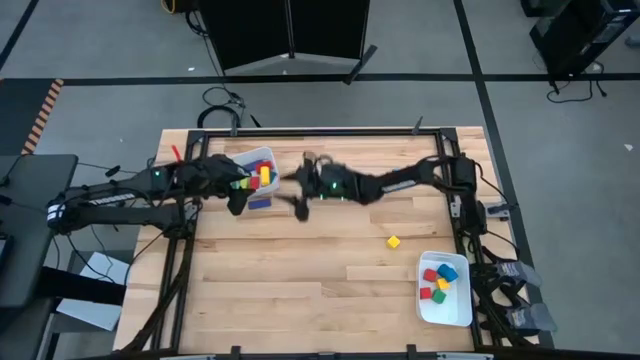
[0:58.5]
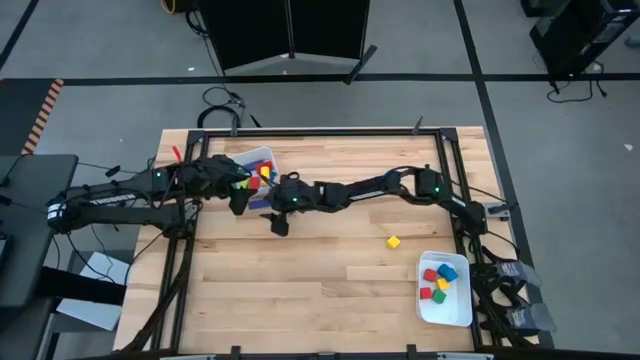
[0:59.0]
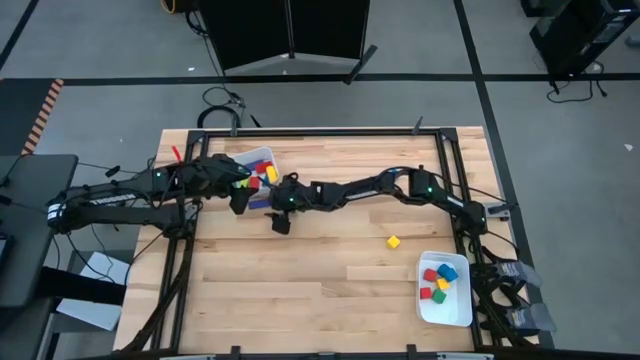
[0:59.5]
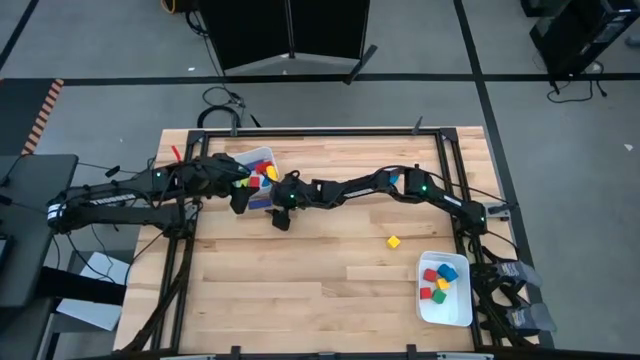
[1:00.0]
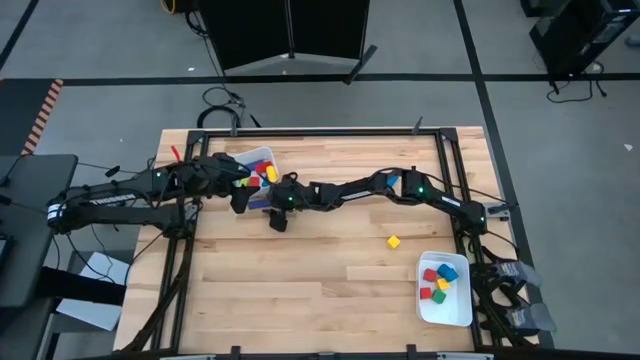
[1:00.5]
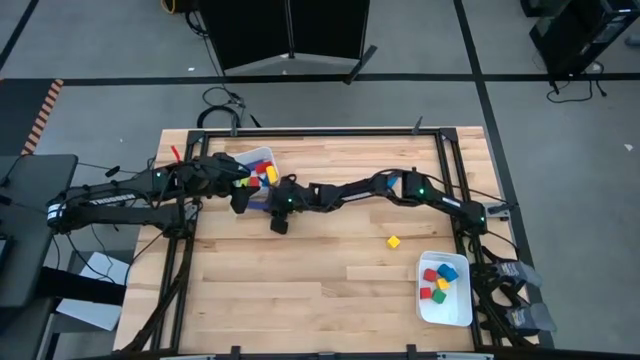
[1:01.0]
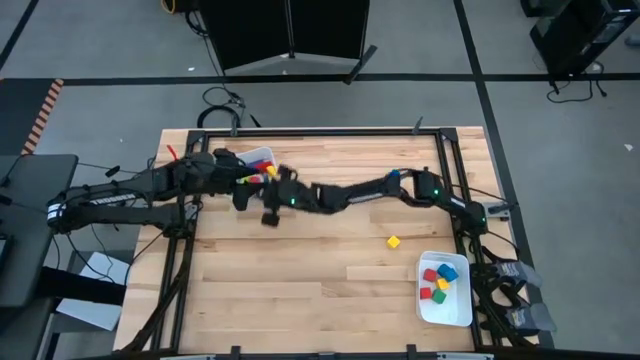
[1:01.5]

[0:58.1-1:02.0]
Task: Sort blocks by size
Put the large blue block into the top white bin

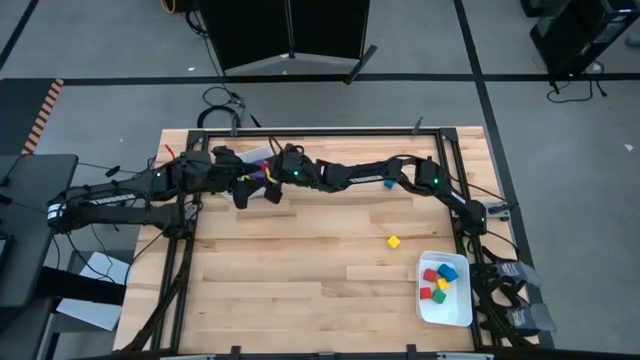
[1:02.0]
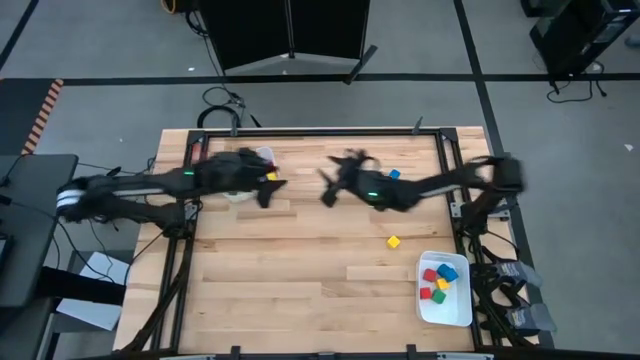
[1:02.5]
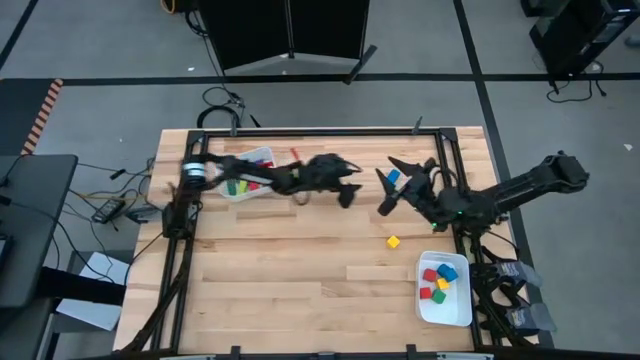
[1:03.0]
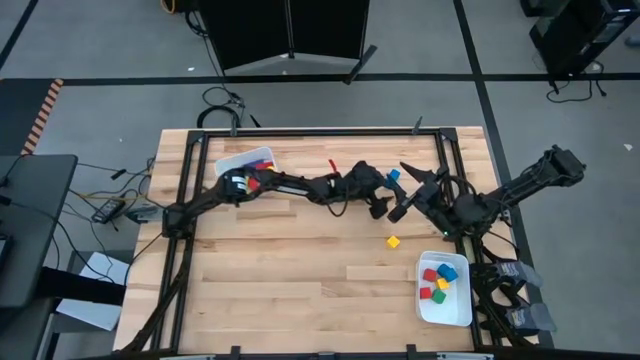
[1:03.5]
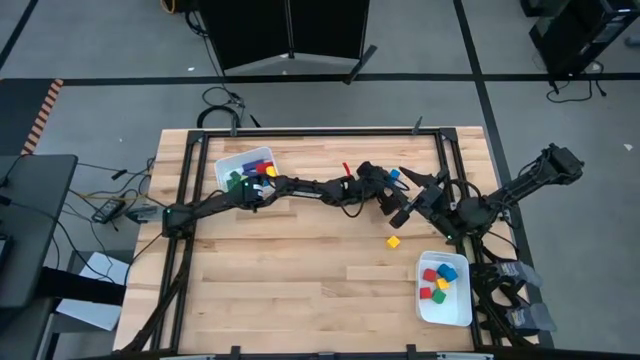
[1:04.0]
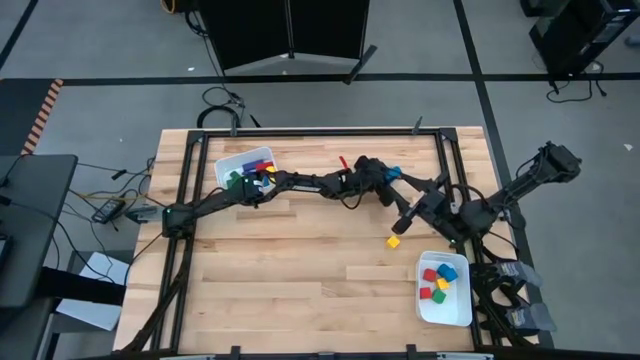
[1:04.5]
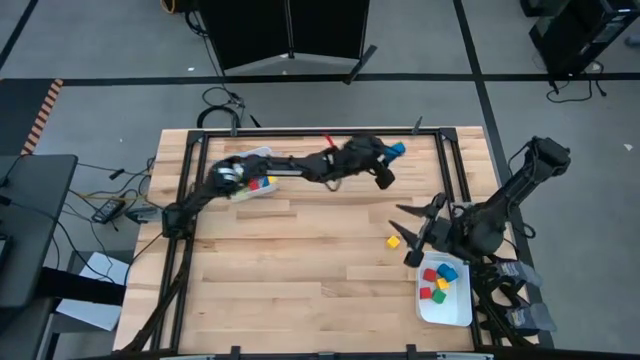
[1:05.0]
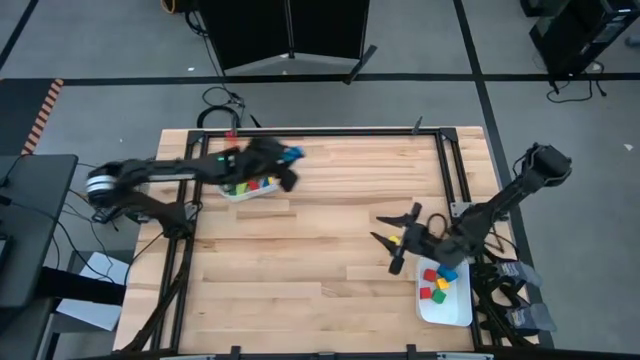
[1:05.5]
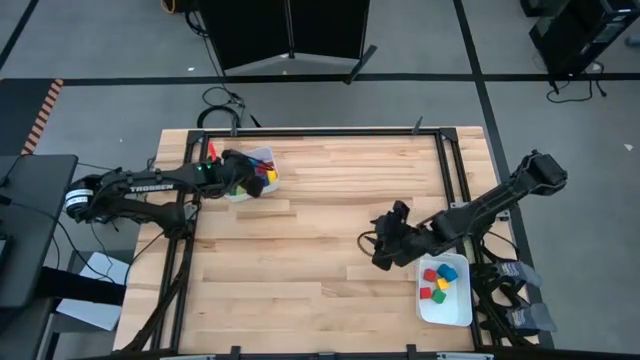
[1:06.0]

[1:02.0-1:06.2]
Put the large blue block into the top white bin

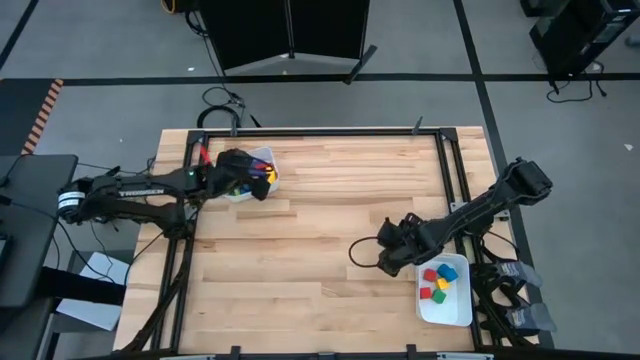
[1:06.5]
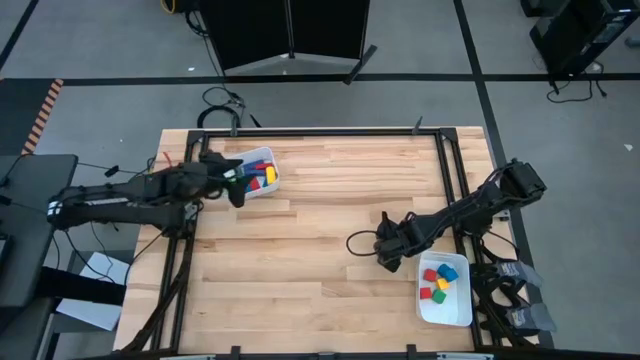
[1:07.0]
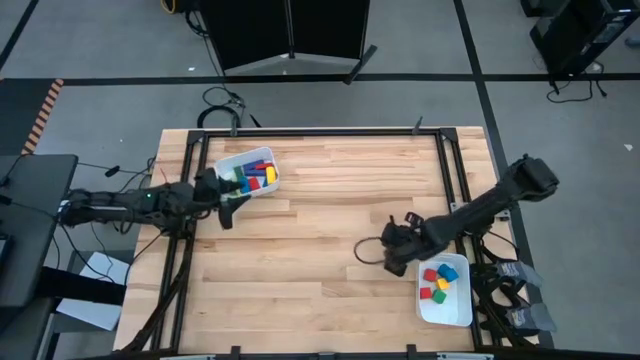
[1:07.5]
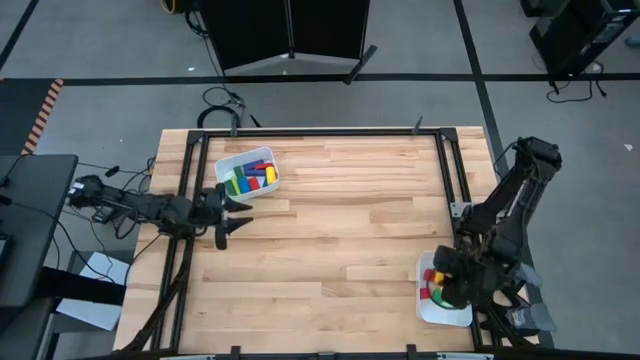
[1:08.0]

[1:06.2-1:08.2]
Put the small yellow block into the bottom white bin

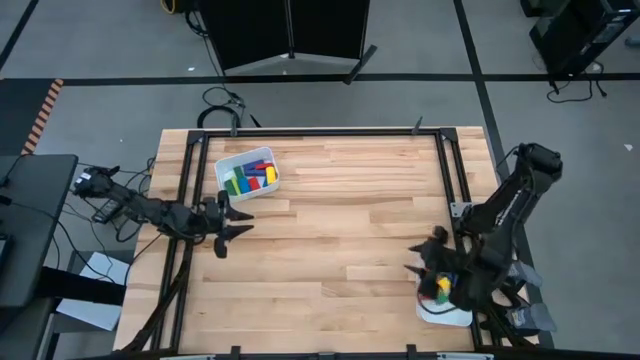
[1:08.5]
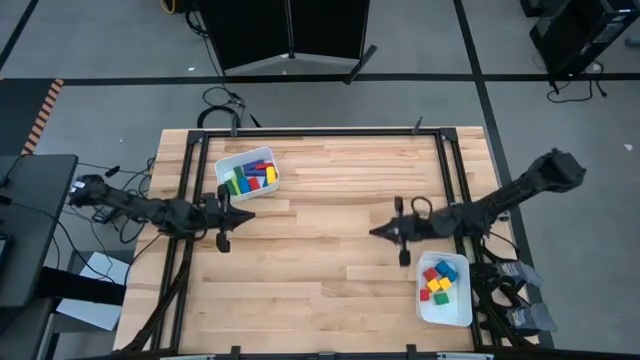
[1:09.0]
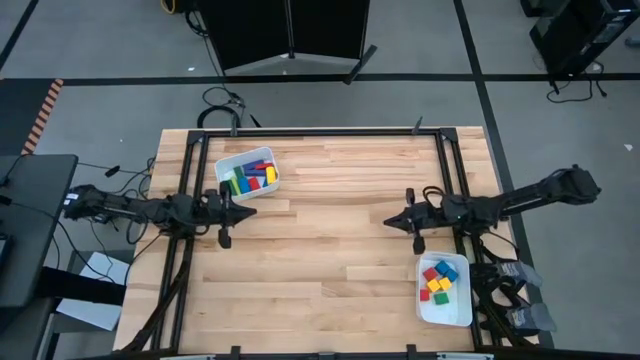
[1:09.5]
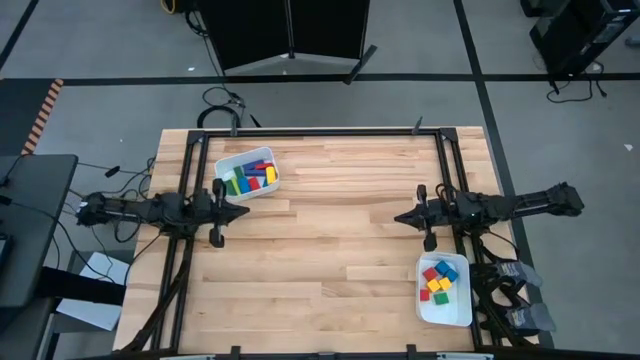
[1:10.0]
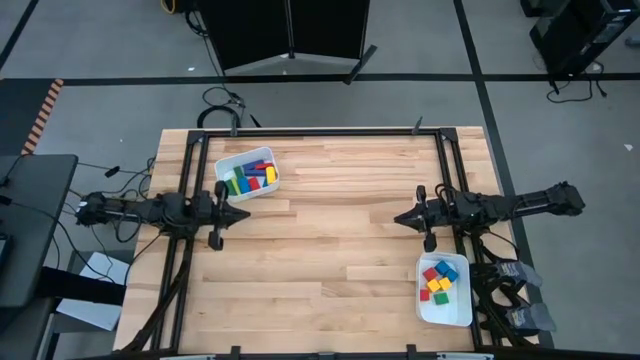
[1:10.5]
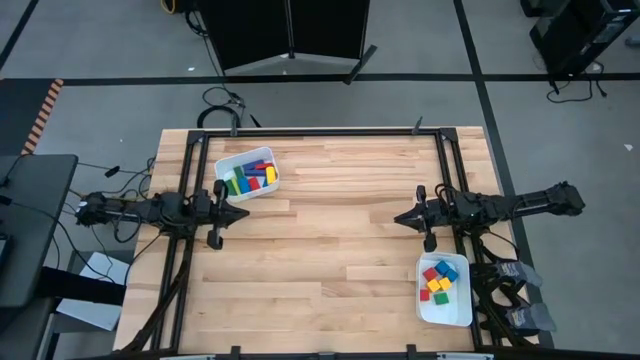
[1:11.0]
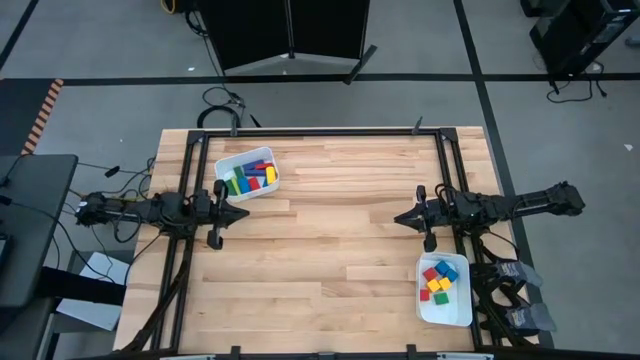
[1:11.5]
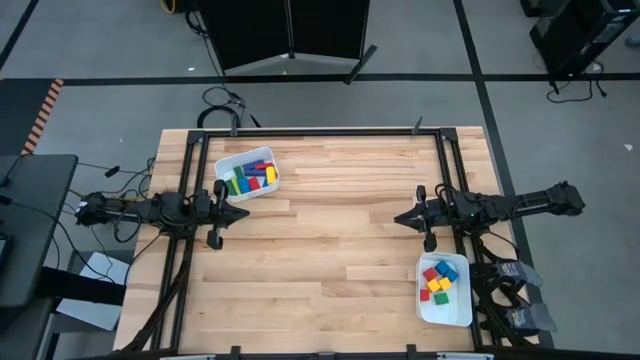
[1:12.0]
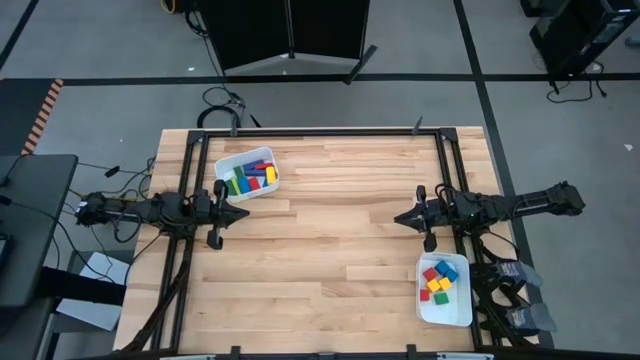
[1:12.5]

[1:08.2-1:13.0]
Return to Home Position

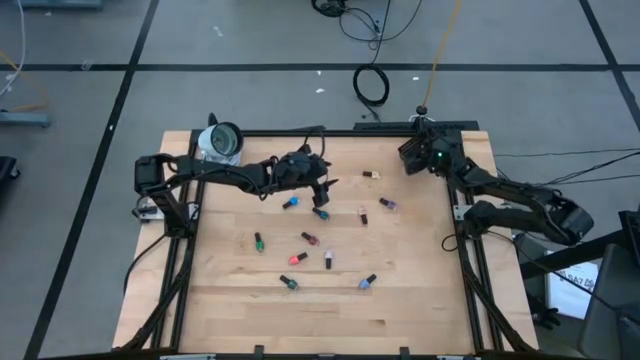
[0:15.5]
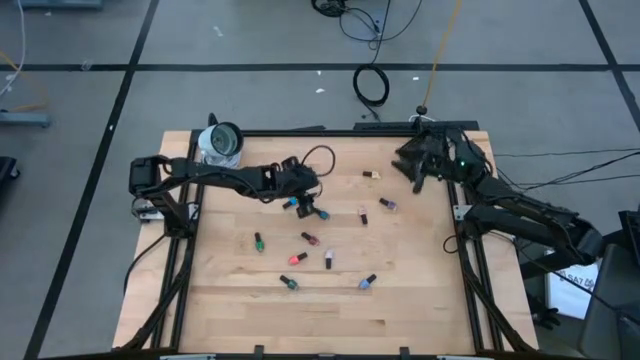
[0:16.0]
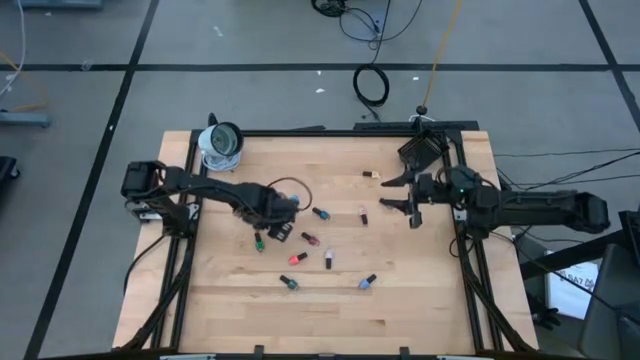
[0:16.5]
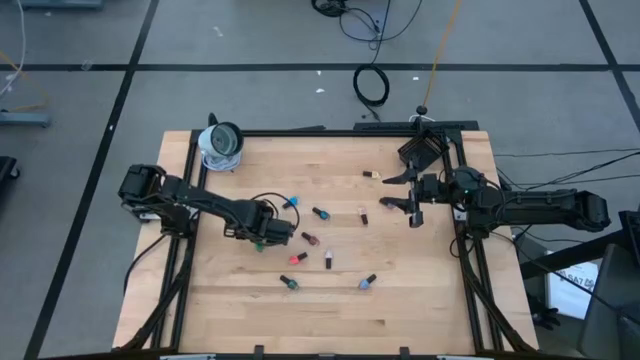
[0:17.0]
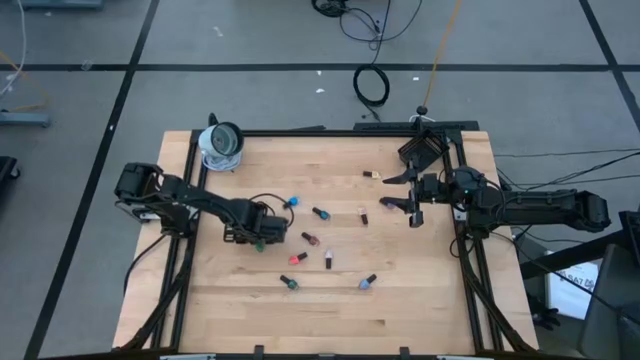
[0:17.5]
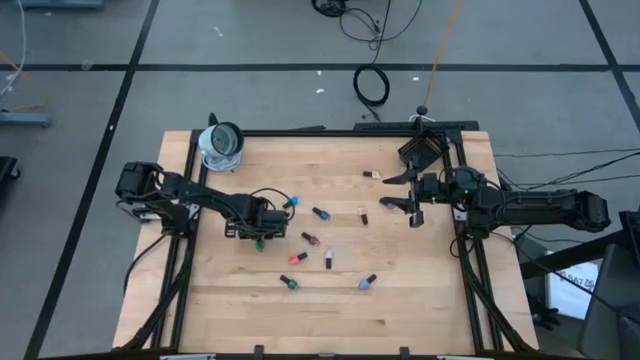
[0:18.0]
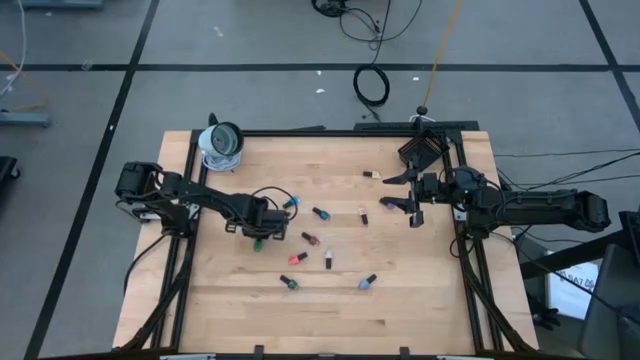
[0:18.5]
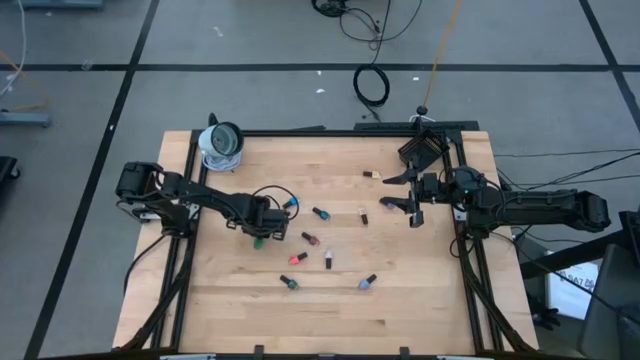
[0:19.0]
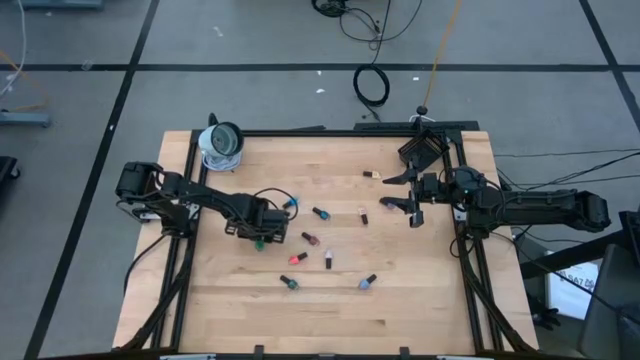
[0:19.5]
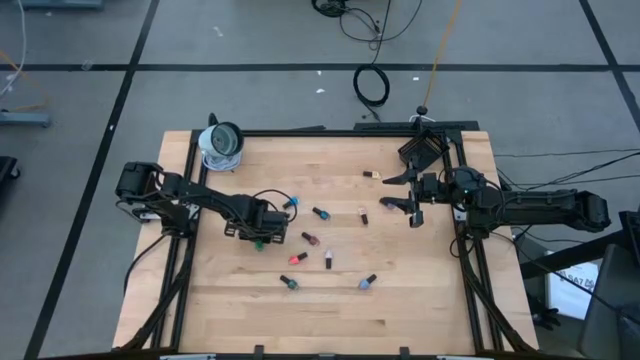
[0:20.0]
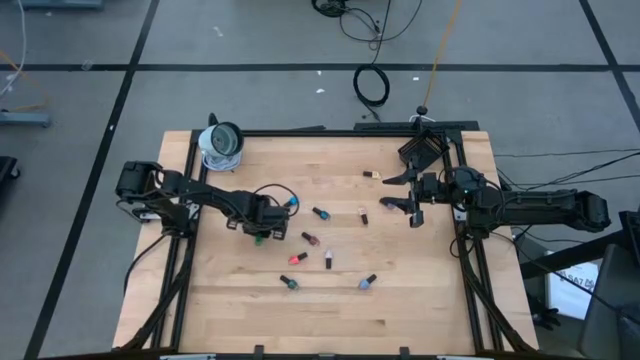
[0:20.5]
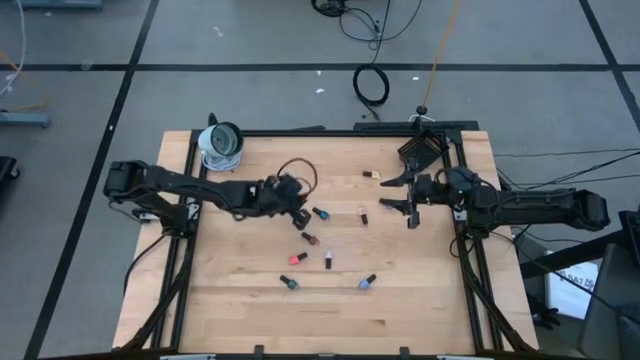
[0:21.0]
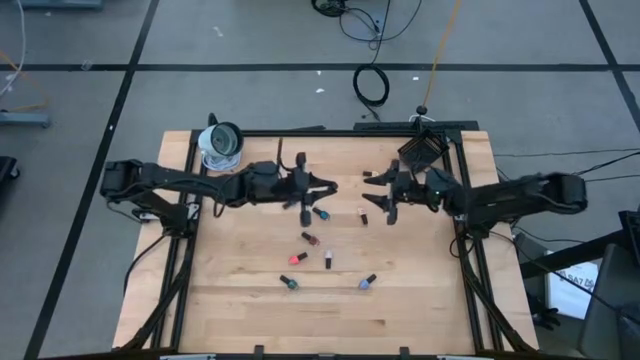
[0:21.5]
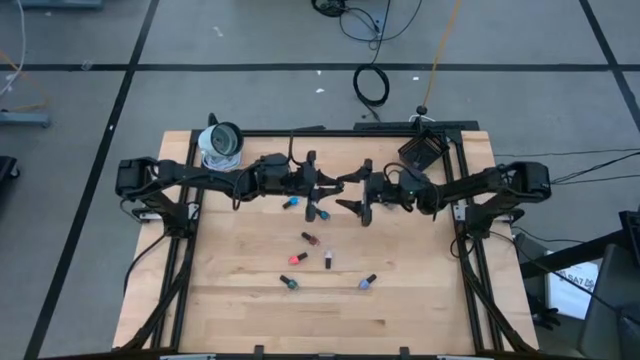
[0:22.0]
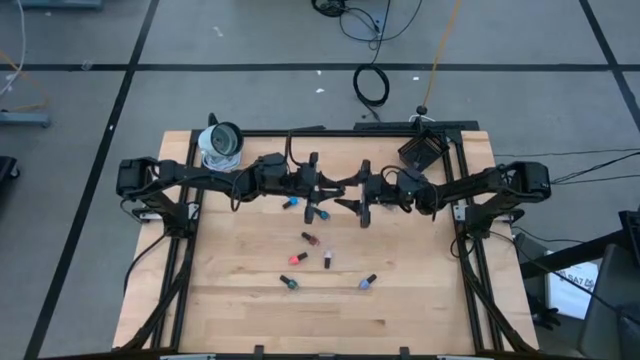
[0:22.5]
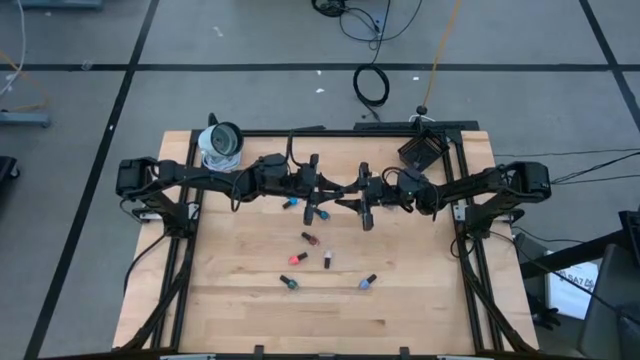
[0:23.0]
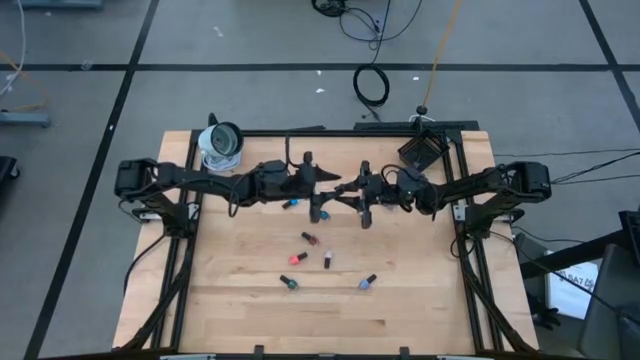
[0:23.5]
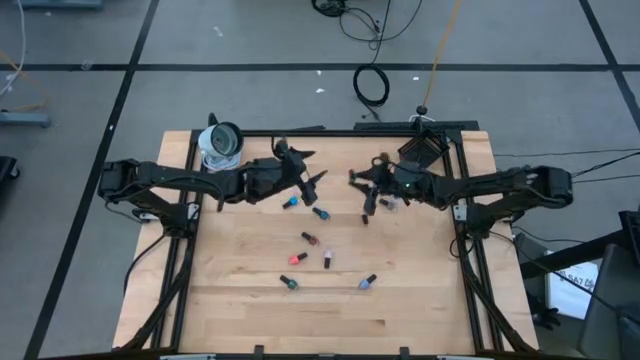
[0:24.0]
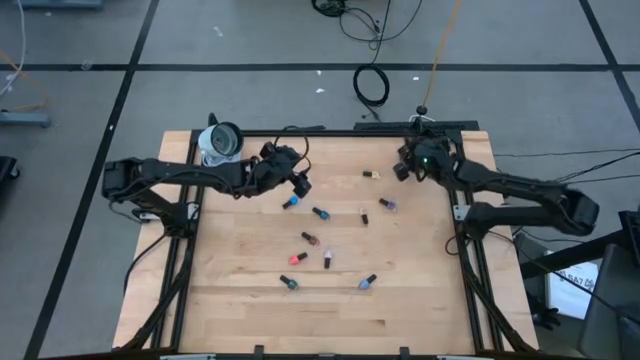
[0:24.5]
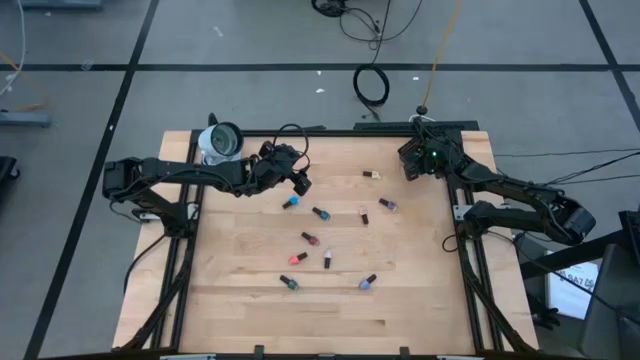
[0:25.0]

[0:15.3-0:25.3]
Task: Pick & Place Nail Polish
Put the green nail polish into the black bin
